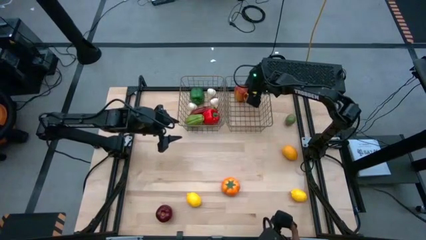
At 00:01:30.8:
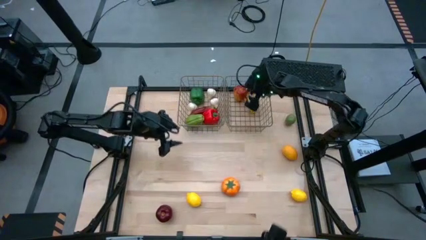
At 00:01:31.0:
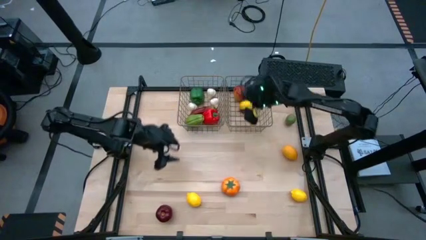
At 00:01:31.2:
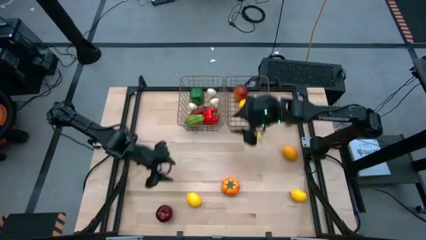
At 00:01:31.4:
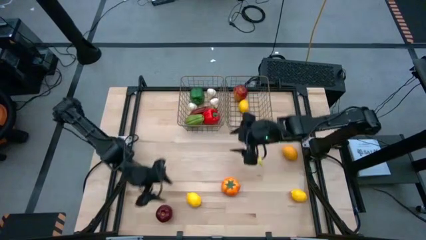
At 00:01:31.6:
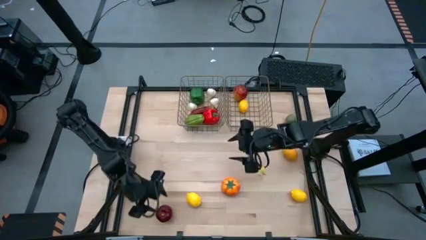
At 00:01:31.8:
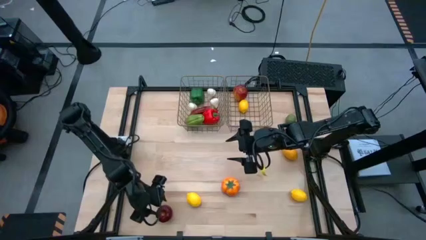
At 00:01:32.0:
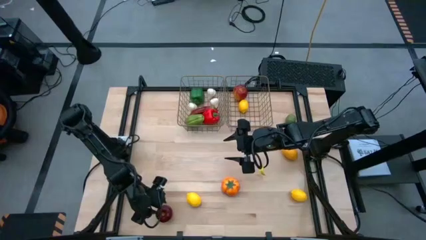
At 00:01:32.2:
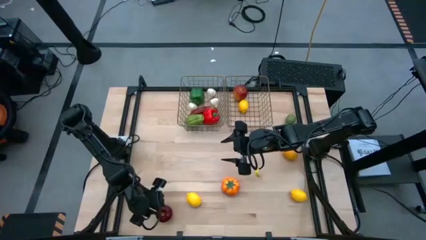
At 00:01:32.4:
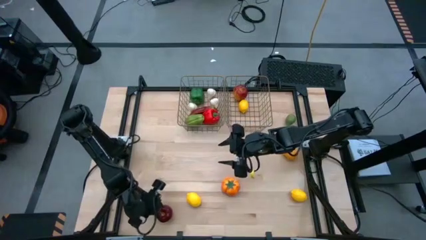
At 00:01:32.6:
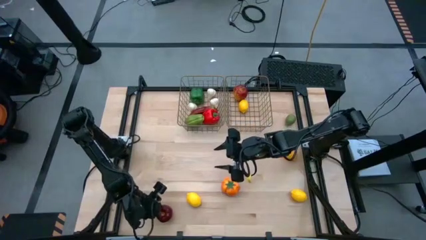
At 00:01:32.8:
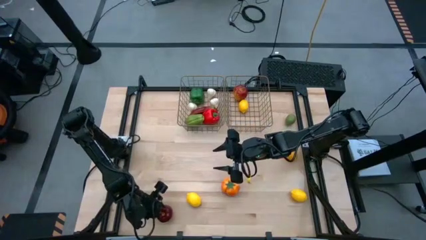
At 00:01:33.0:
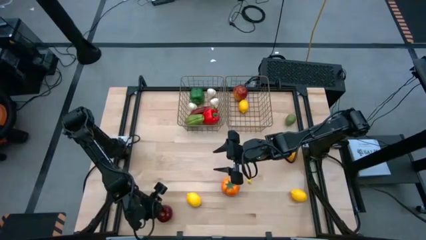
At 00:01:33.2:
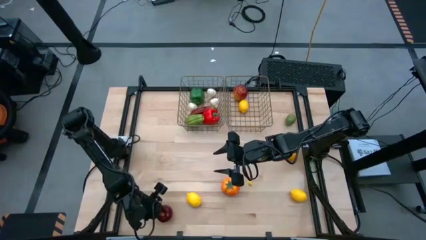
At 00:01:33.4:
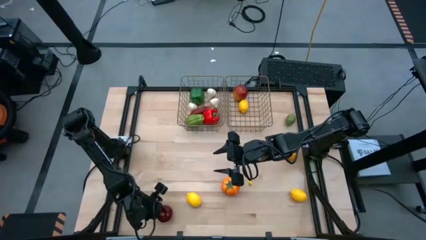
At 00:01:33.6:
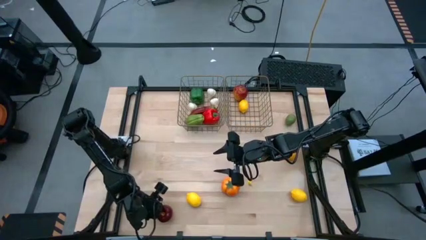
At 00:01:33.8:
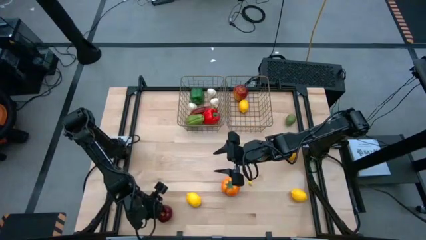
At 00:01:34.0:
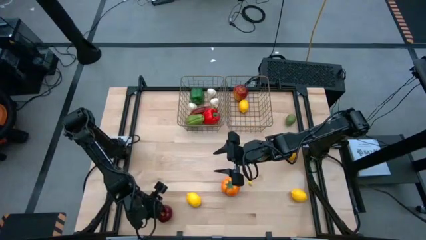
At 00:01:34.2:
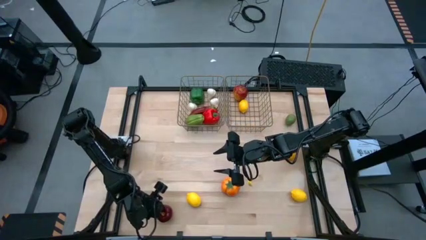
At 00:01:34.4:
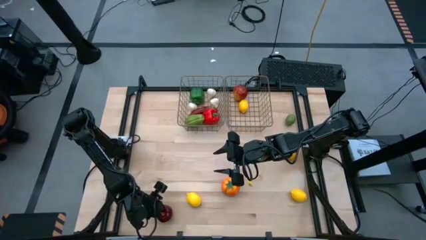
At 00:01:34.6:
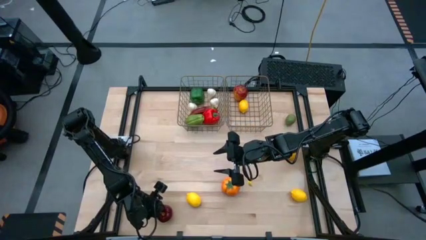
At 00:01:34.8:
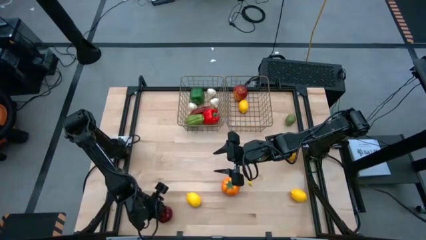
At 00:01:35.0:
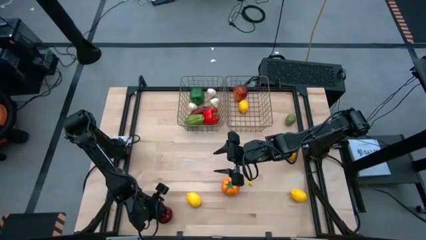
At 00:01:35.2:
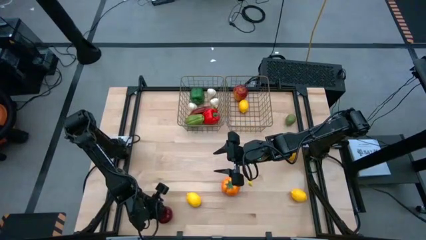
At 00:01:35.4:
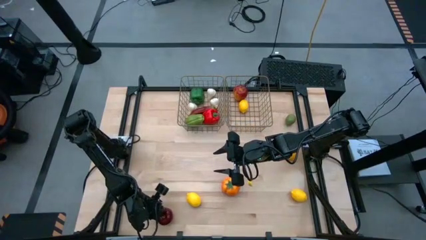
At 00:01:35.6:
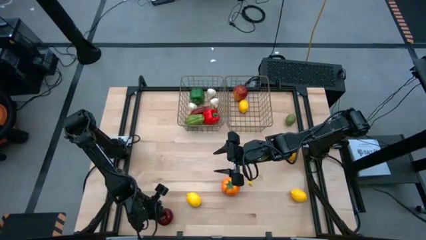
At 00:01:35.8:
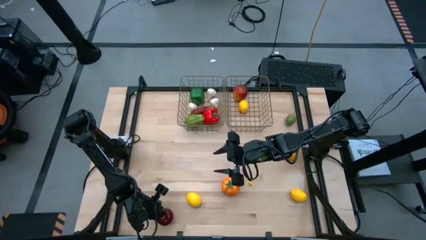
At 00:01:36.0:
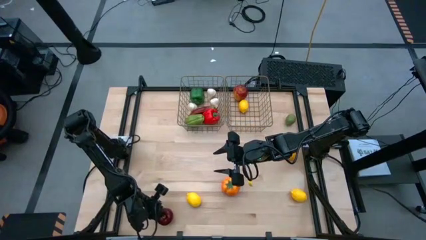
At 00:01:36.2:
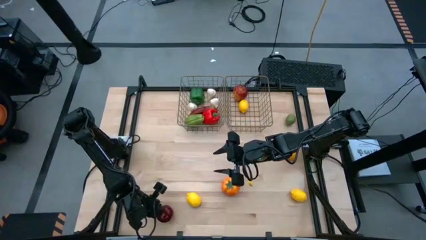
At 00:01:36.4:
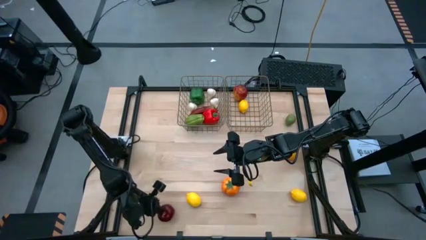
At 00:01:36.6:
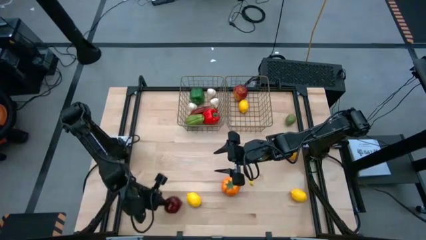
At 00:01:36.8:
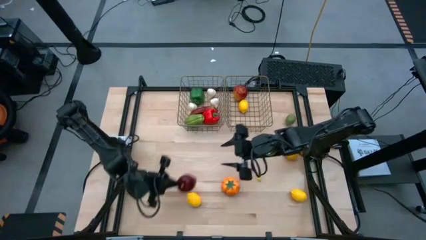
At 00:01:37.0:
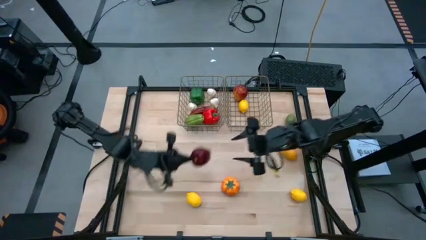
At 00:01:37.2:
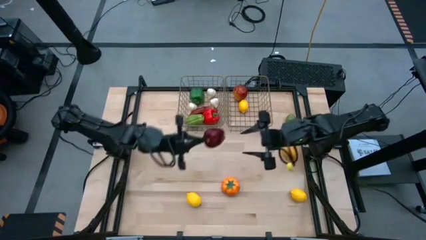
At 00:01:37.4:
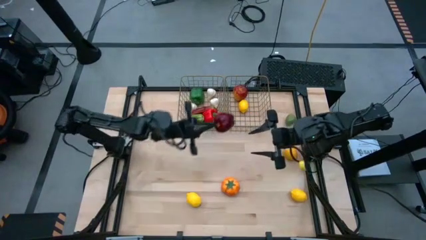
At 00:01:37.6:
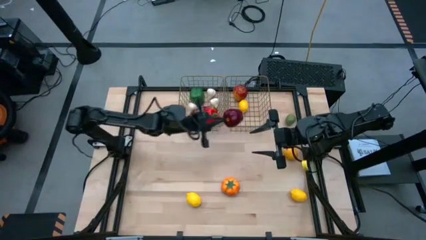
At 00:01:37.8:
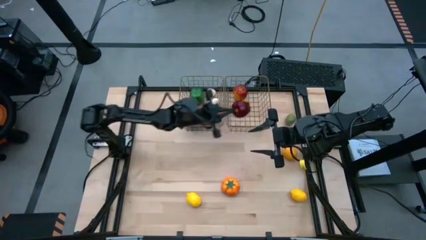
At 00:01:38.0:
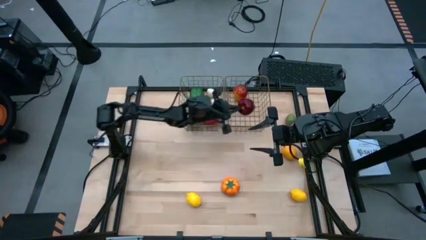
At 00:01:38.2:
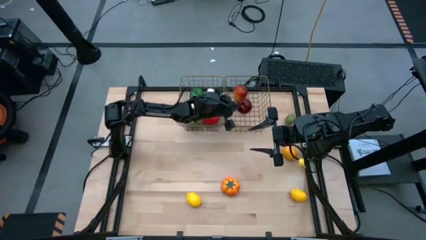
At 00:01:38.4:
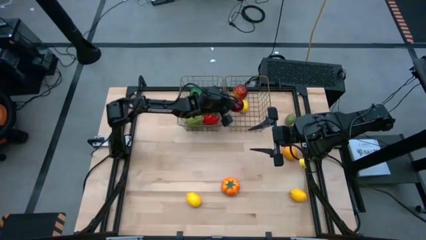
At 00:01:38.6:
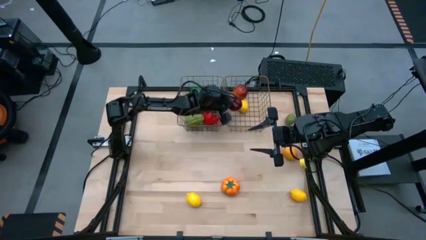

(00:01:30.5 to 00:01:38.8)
Task: Sort produce into baskets
Put the apple into the right mesh basket

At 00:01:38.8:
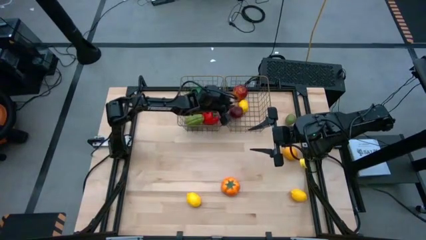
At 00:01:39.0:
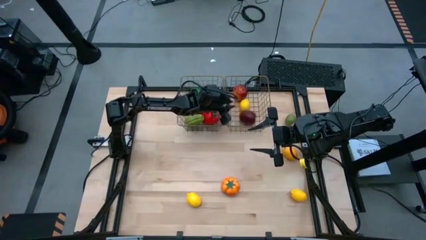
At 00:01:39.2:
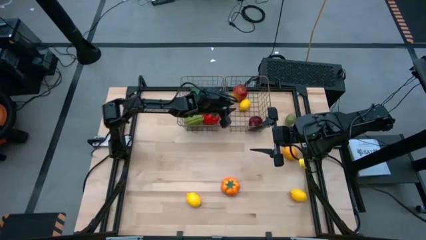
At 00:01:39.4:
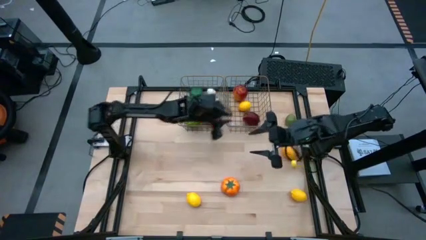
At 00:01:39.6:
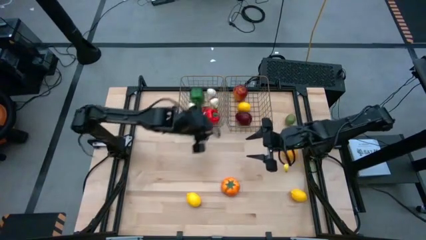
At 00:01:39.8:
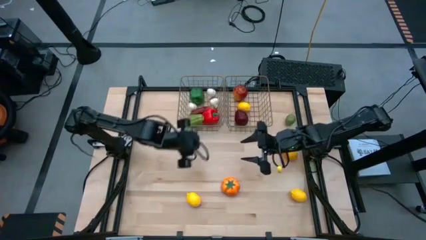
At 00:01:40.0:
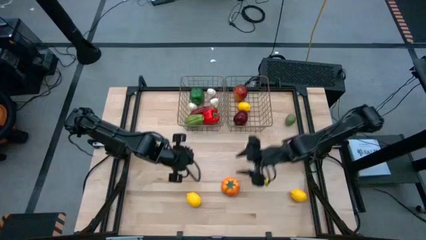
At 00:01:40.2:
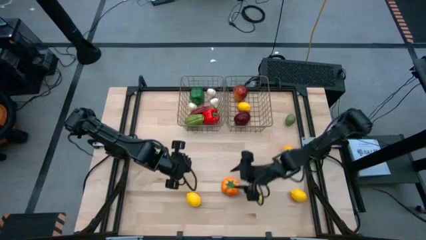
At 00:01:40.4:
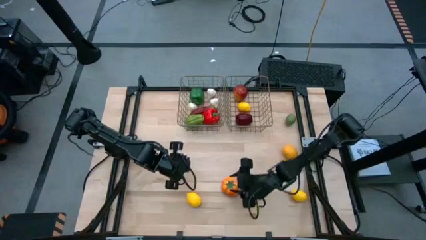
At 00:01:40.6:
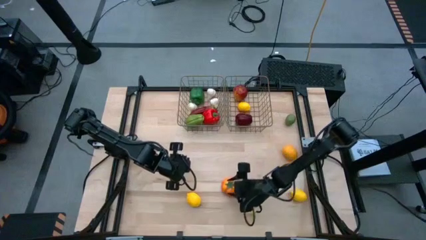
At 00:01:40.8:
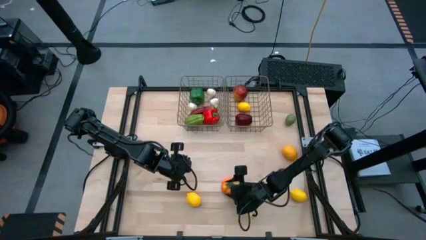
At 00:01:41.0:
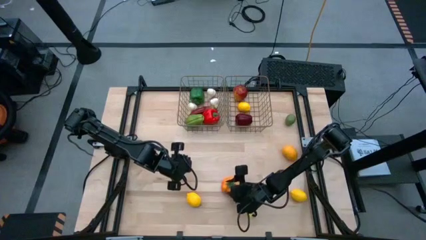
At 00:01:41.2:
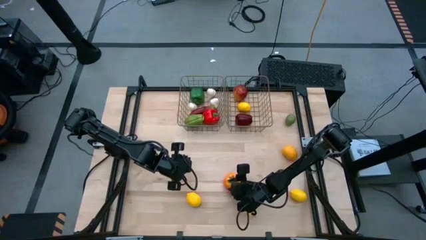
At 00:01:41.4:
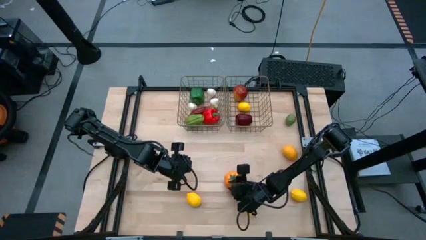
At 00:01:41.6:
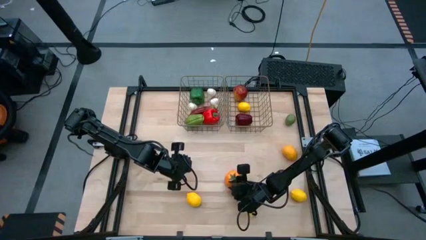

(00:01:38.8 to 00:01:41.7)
Put the orange tomato into the right mesh basket

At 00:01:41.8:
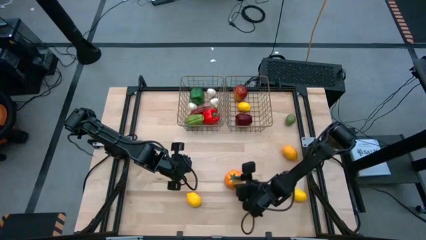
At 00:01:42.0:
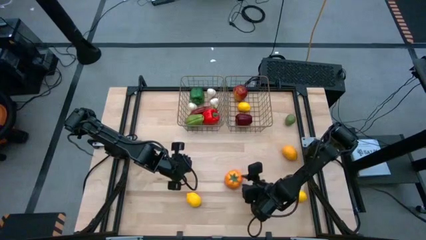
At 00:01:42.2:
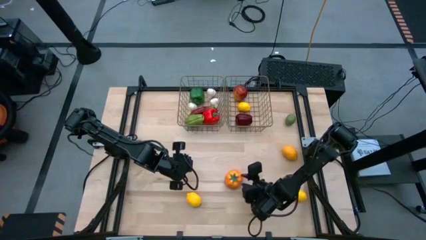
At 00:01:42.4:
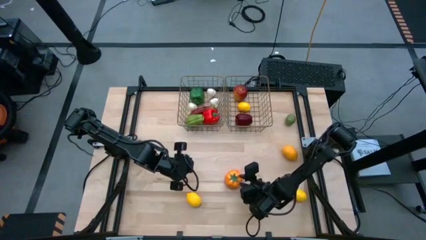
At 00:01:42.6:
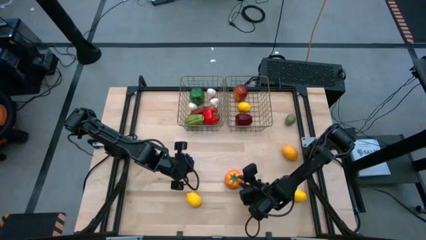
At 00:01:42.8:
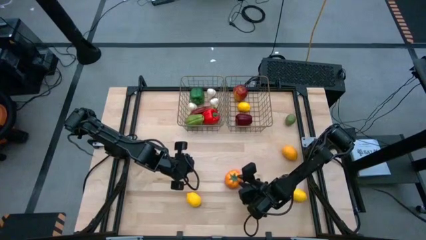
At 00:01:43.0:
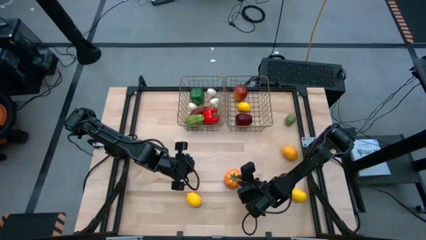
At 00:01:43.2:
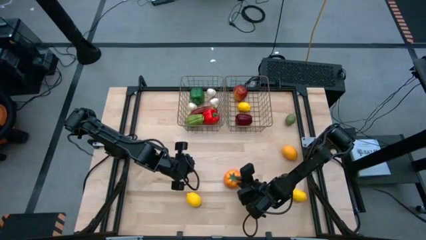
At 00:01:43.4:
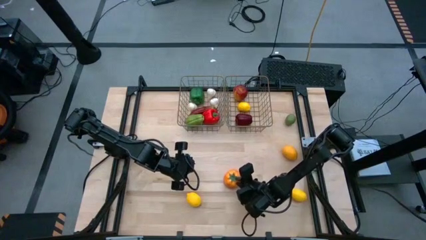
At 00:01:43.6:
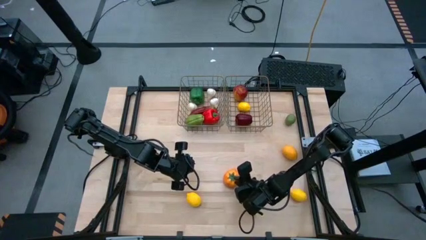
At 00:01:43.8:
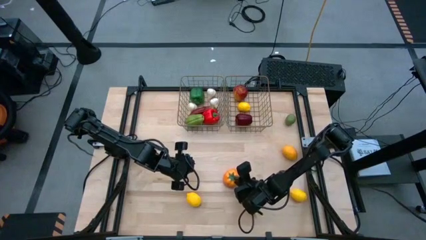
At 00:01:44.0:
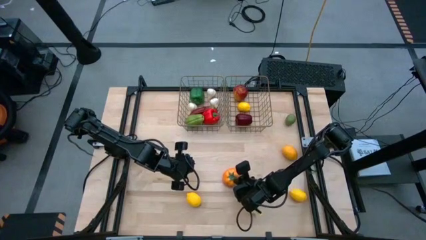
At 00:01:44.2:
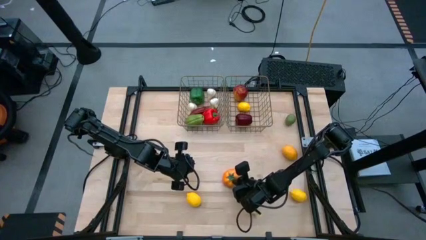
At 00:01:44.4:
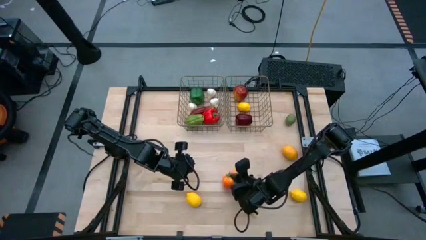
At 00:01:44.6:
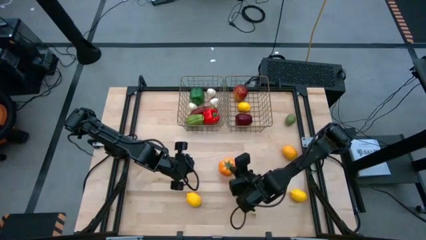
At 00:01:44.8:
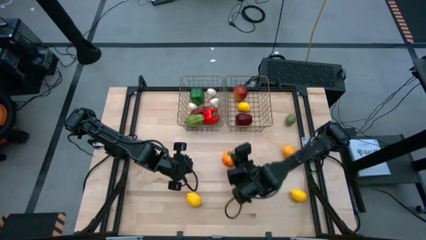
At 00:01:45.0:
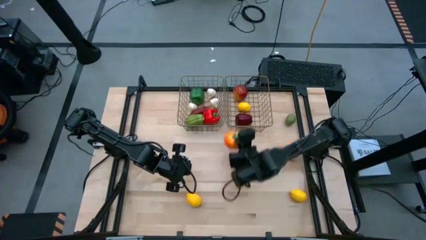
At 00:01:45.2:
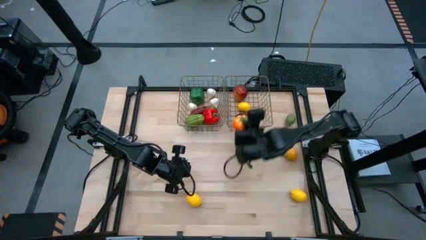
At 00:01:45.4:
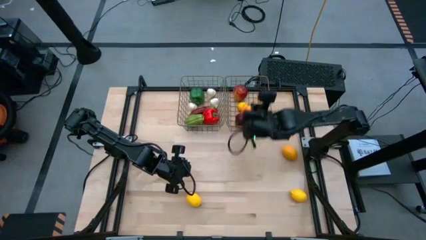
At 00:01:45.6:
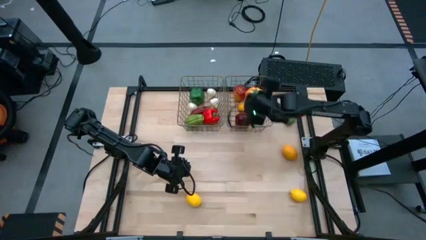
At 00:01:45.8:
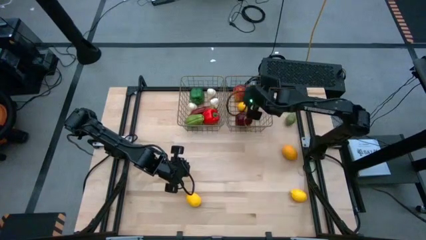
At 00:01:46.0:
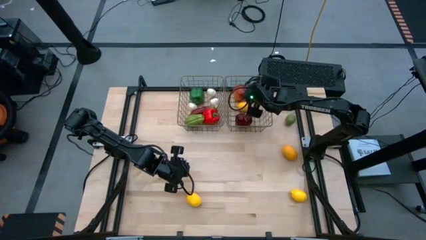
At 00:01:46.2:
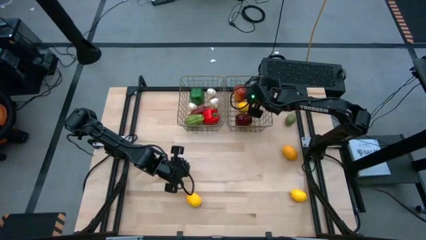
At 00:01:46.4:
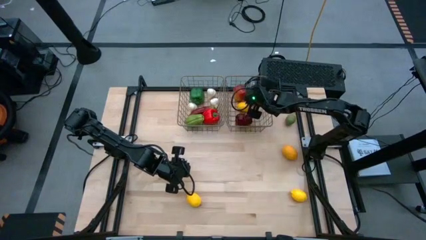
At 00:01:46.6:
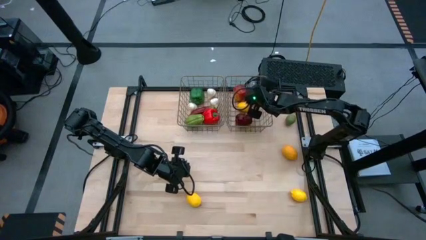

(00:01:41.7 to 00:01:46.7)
Put the orange tomato into the right mesh basket
